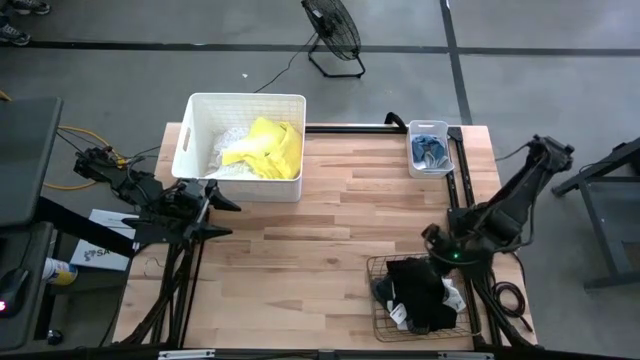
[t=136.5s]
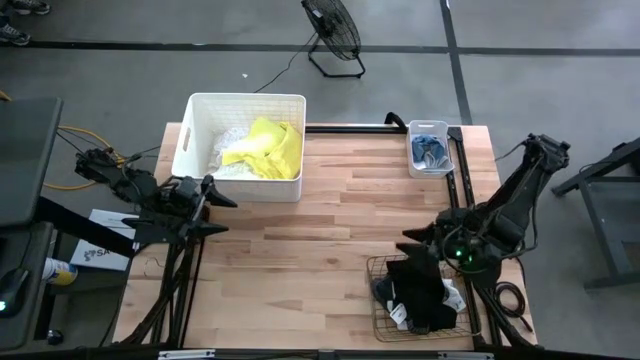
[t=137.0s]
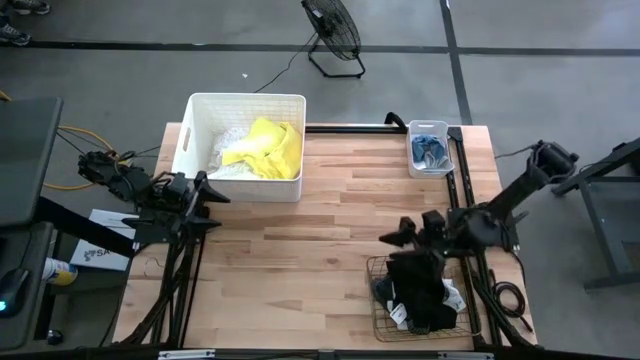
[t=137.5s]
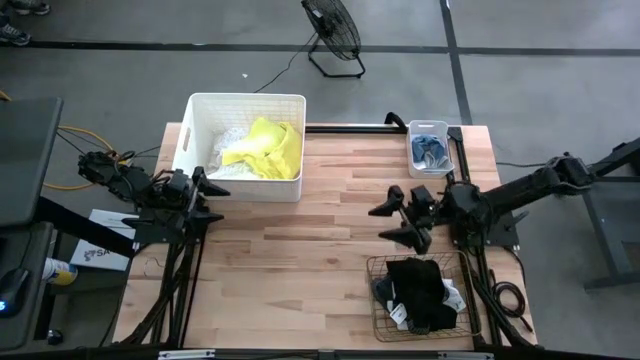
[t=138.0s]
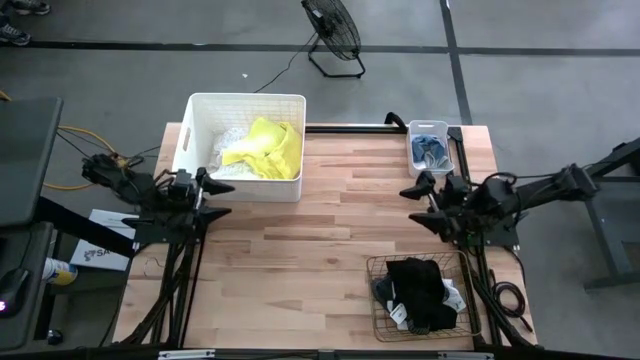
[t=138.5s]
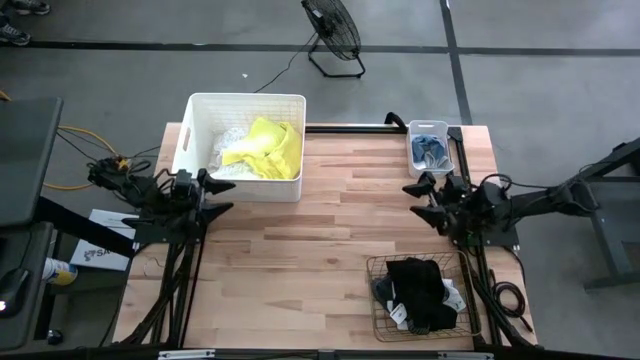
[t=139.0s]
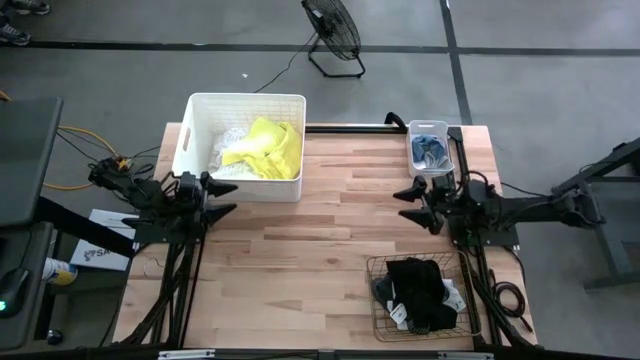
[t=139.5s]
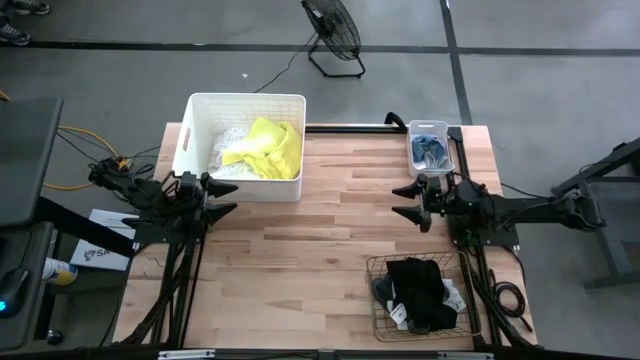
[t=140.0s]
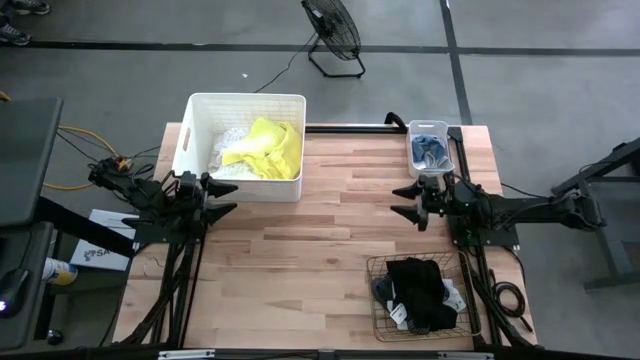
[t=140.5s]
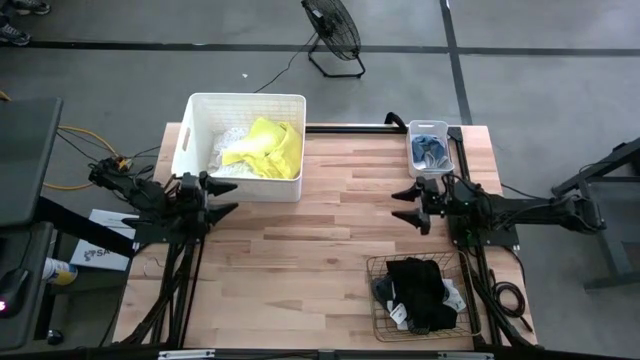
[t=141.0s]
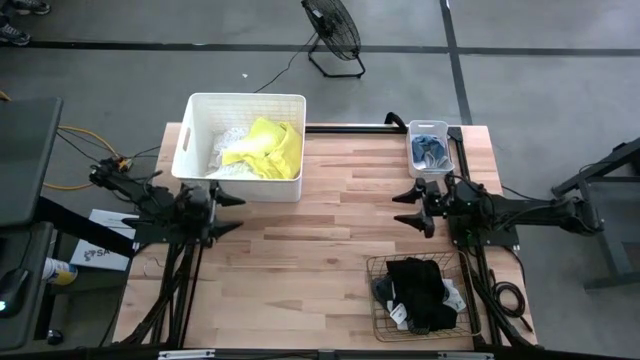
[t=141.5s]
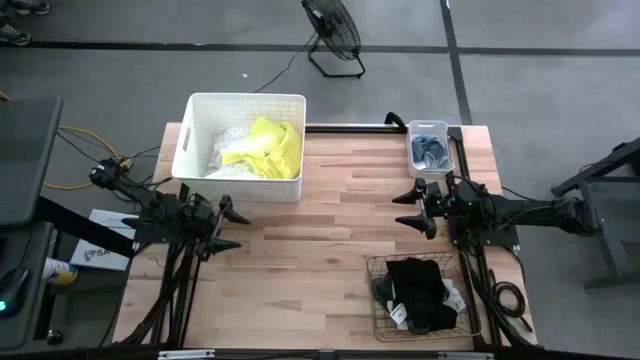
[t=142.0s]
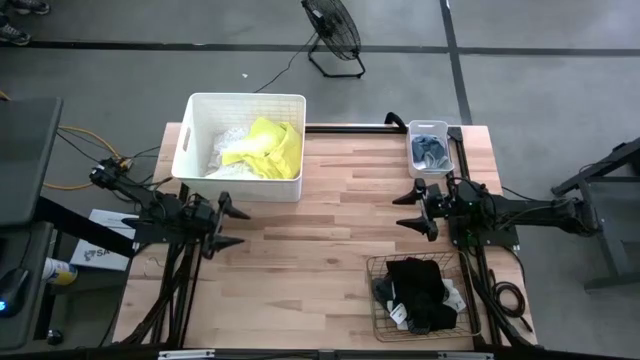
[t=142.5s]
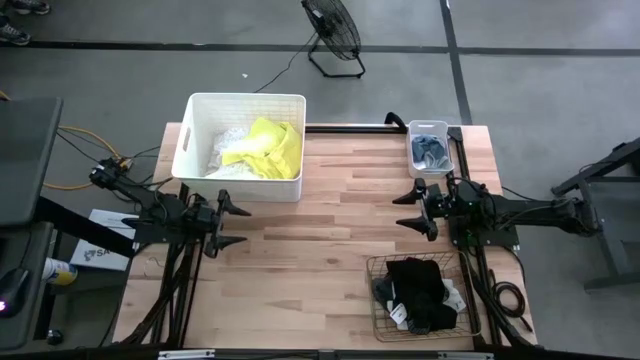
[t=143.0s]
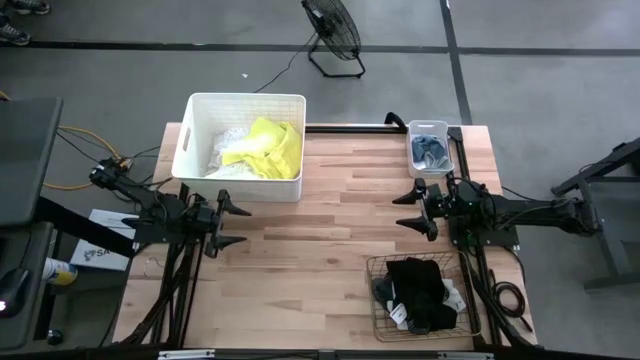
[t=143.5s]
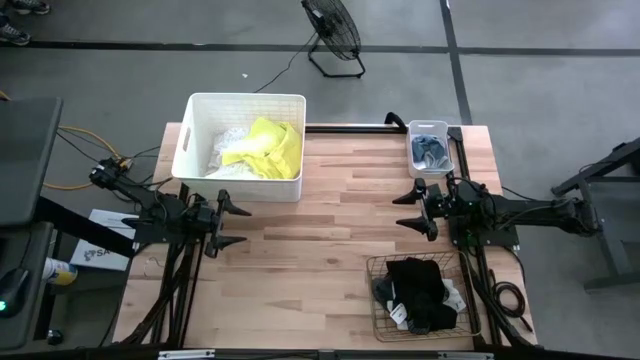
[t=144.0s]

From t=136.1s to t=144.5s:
Task: Pick & Place Cloths
Return to Home Position

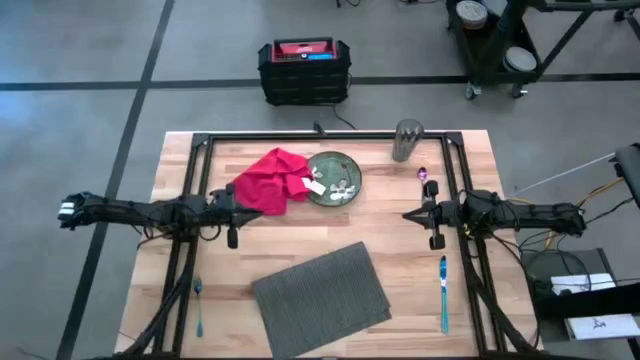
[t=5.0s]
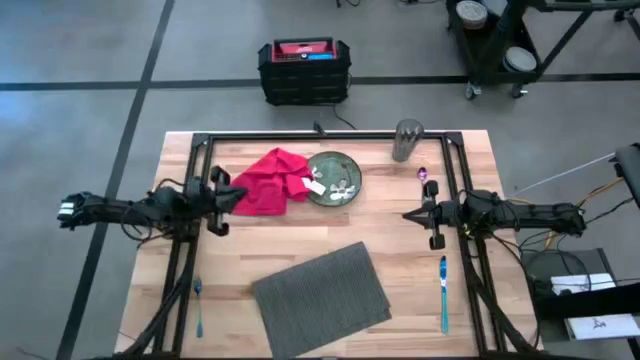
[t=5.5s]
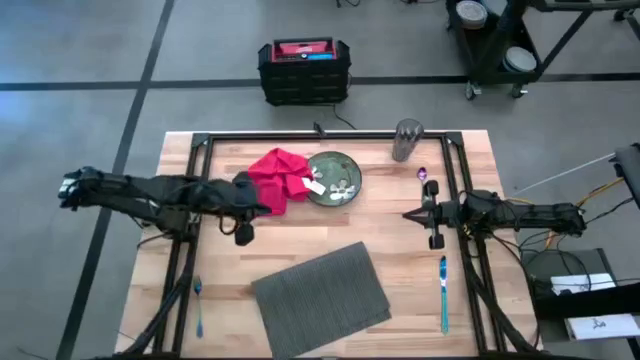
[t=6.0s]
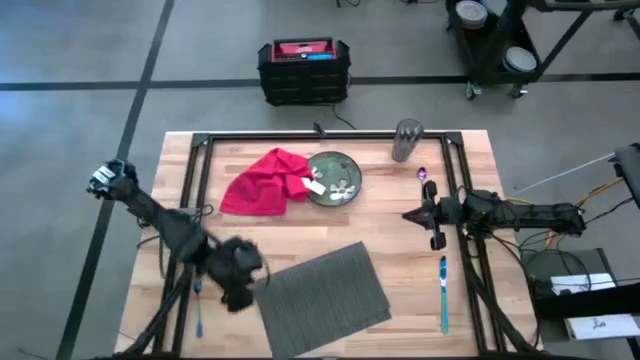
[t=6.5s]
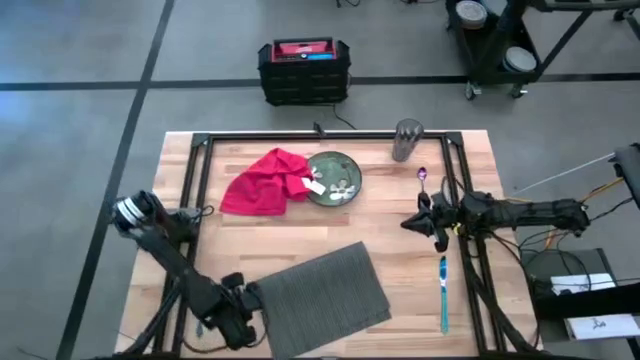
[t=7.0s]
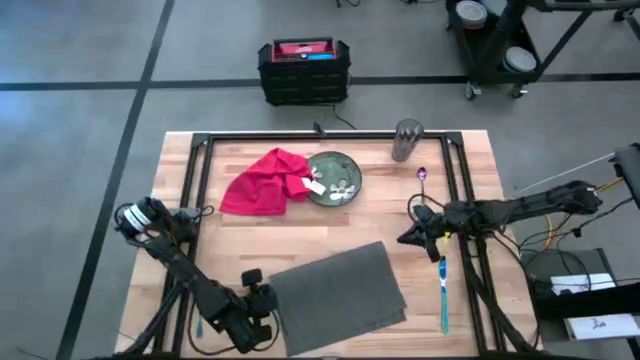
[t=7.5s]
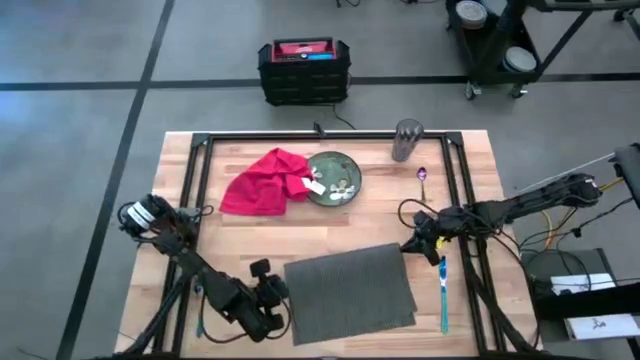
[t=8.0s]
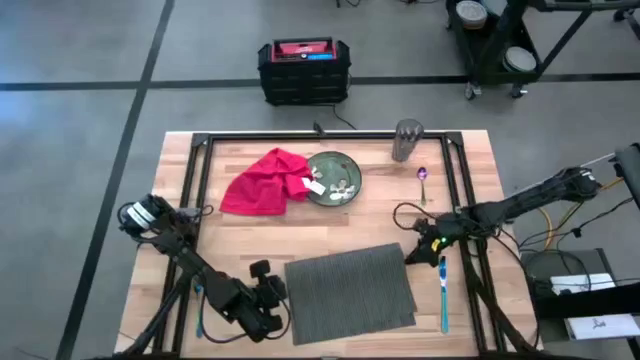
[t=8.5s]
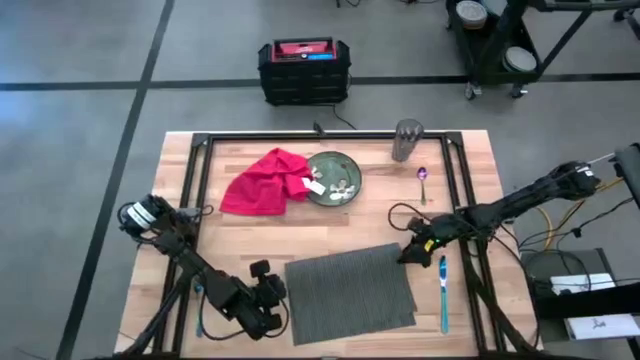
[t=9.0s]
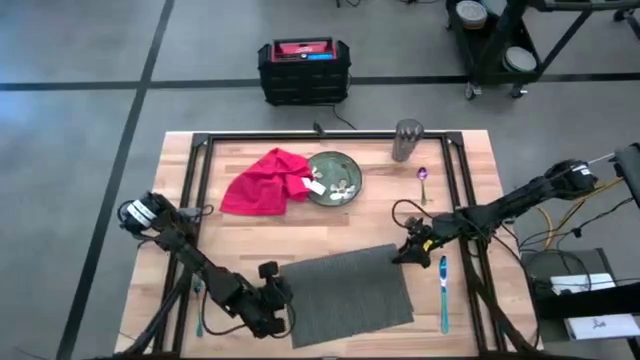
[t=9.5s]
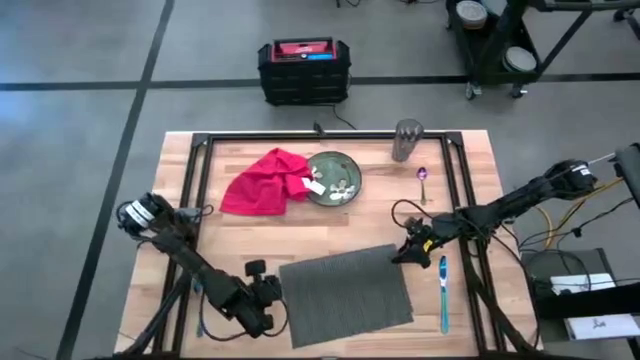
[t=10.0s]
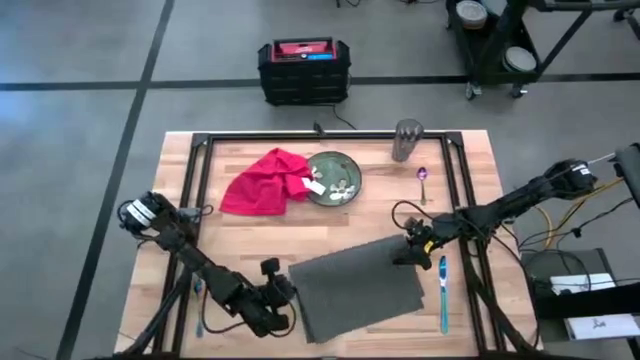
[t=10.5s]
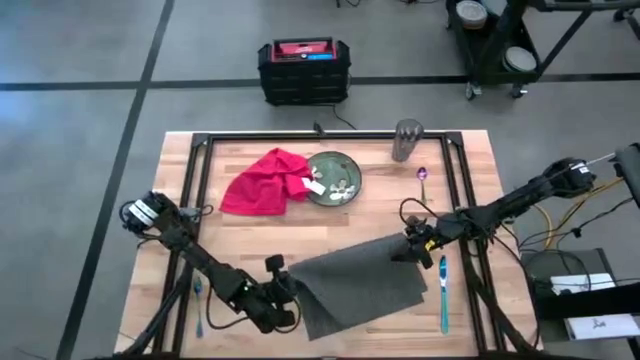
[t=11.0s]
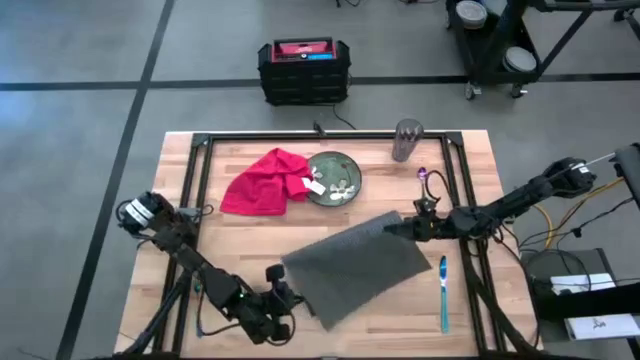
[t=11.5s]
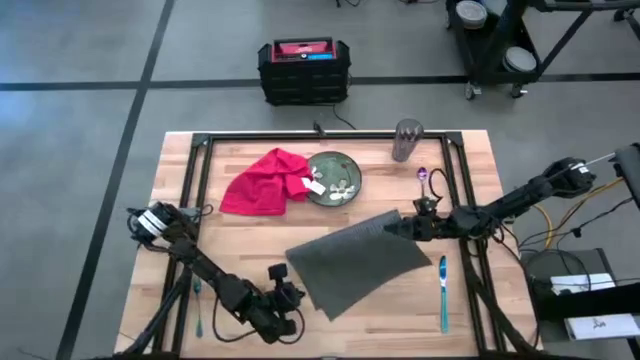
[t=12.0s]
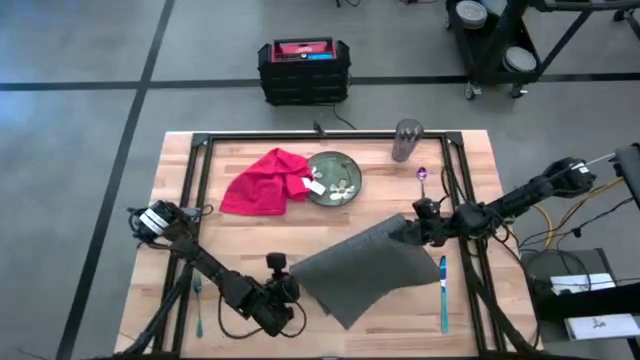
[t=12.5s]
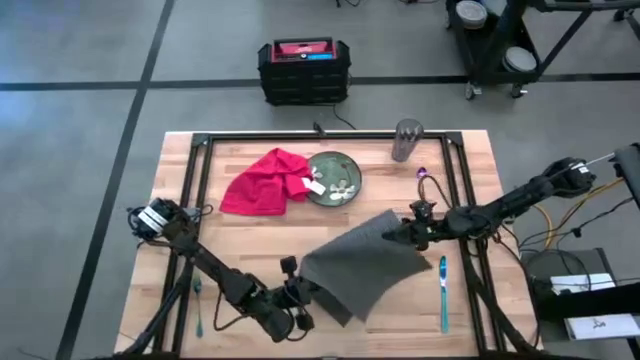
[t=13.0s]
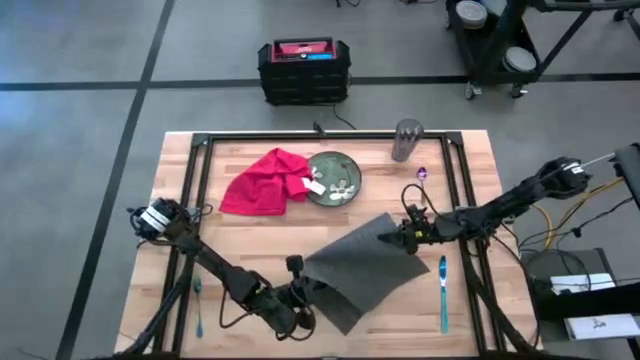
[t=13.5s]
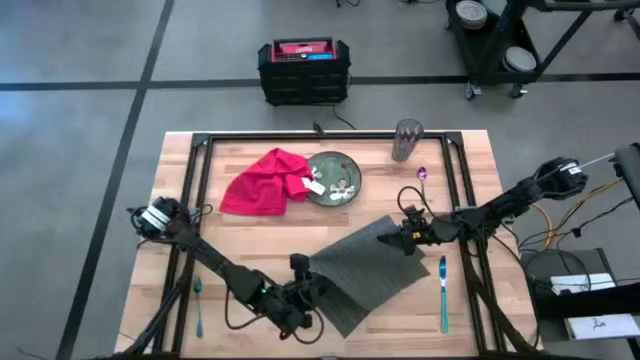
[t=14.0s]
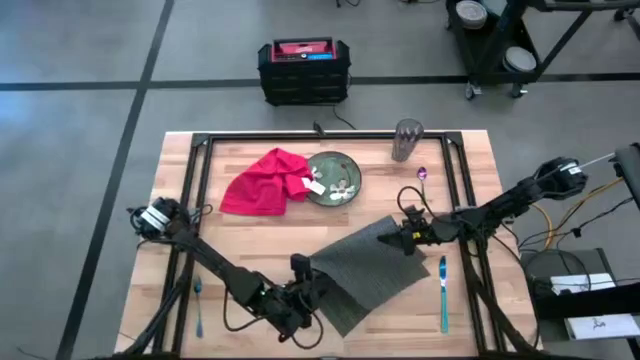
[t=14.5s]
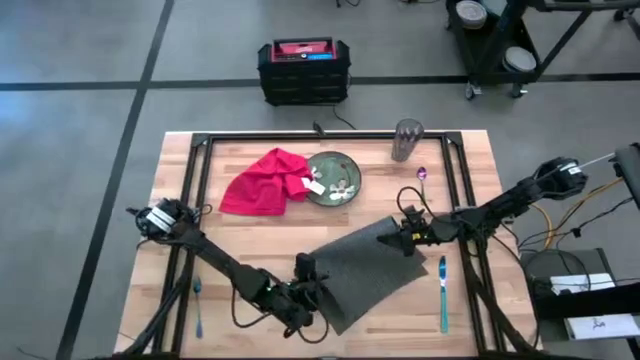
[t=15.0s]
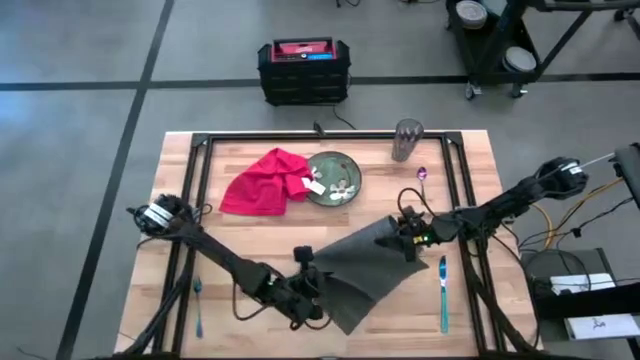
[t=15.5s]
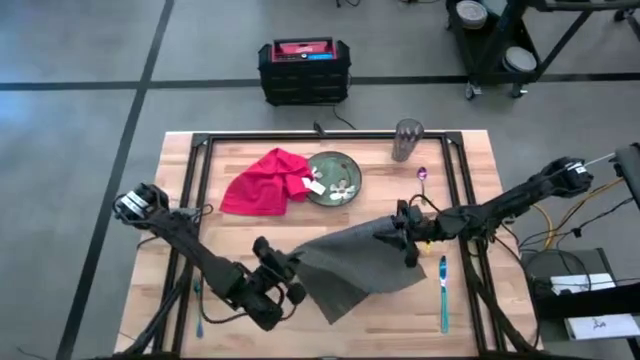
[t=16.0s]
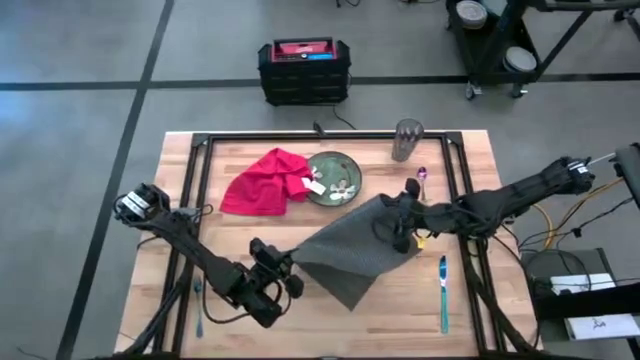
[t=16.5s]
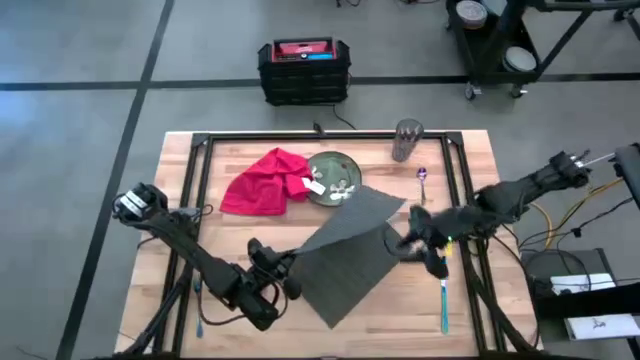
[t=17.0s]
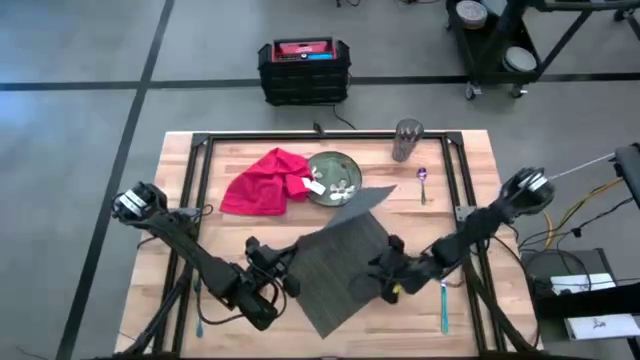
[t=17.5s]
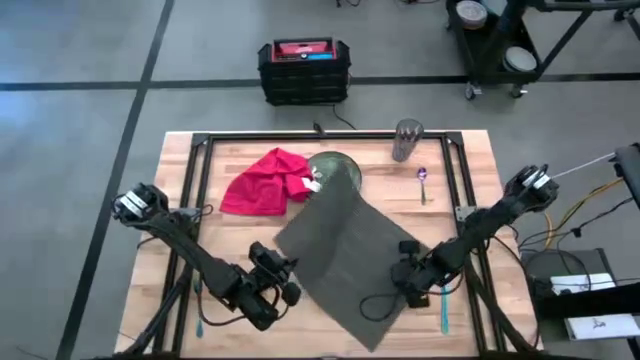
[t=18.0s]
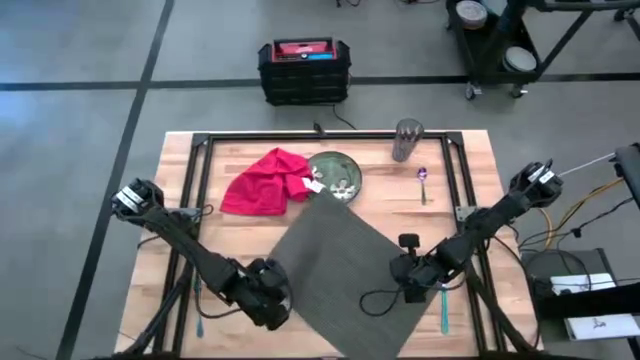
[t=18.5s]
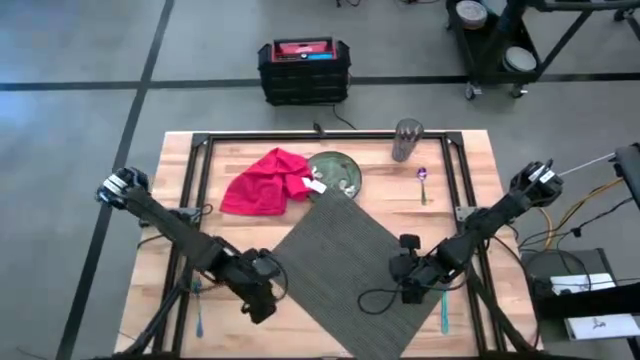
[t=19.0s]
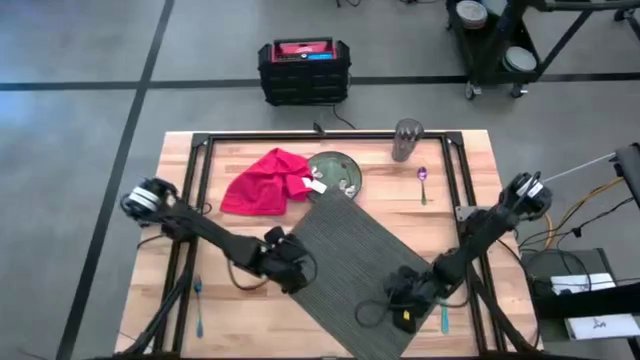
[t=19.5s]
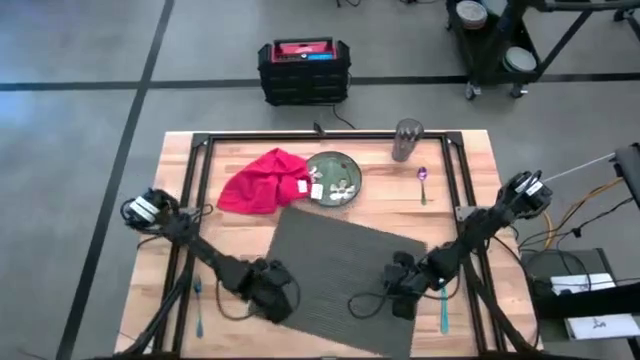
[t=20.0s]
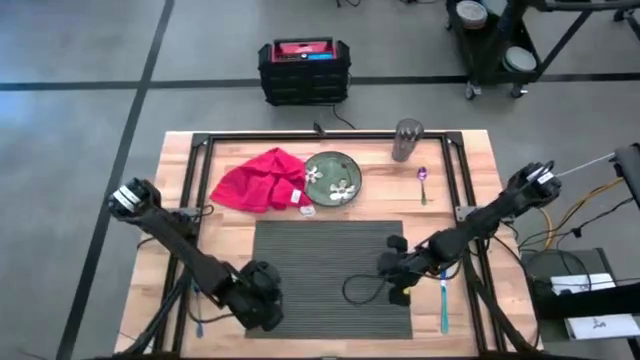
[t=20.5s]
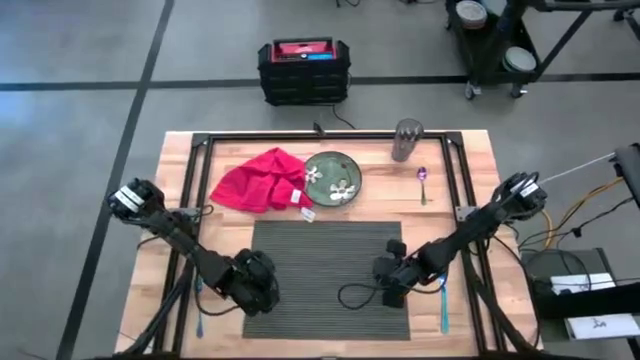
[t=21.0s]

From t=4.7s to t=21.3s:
Task: Set table place
Prepare the gray tablemat
